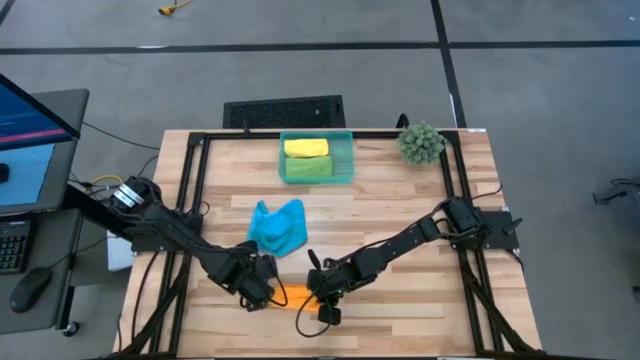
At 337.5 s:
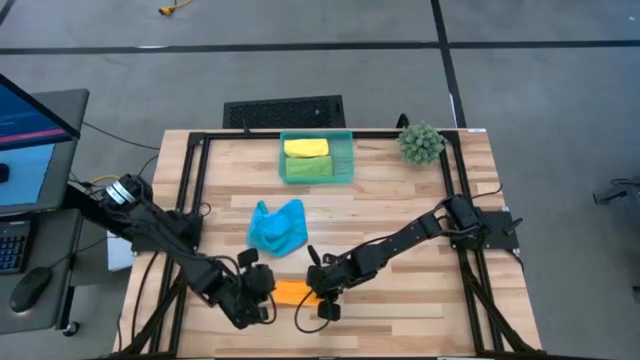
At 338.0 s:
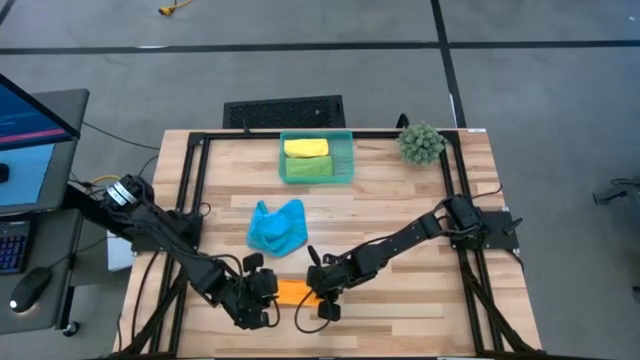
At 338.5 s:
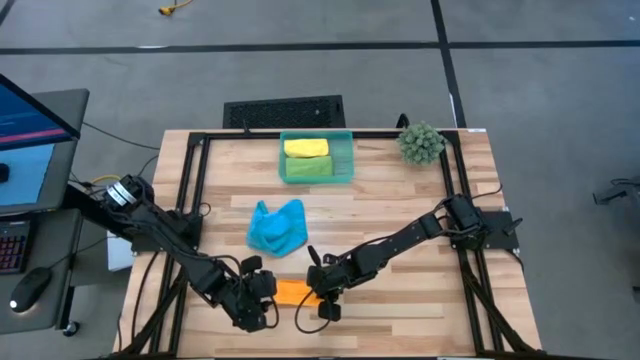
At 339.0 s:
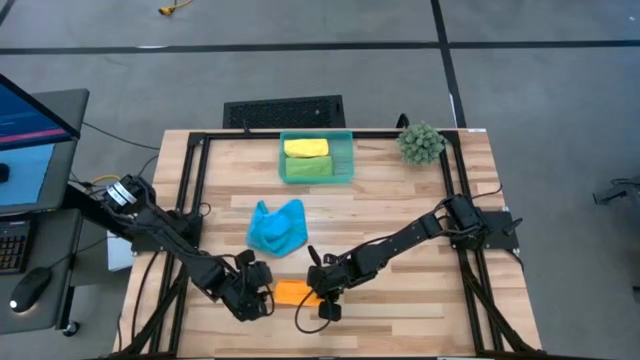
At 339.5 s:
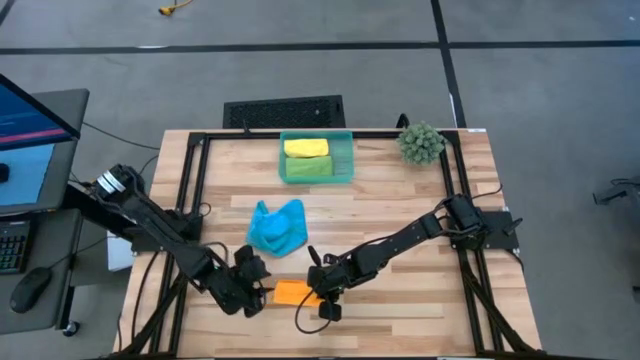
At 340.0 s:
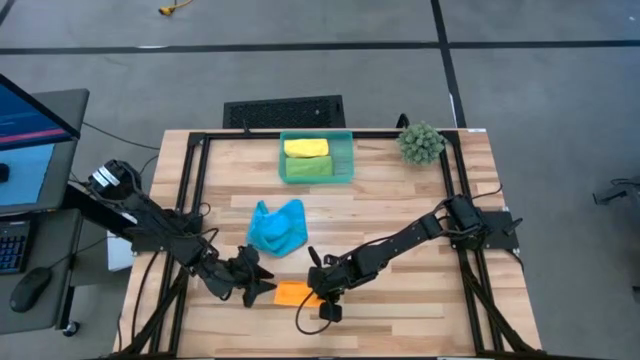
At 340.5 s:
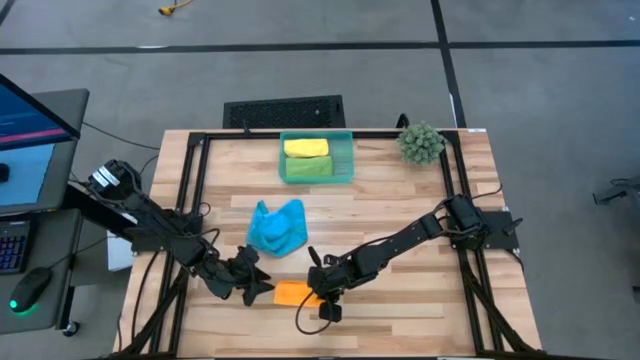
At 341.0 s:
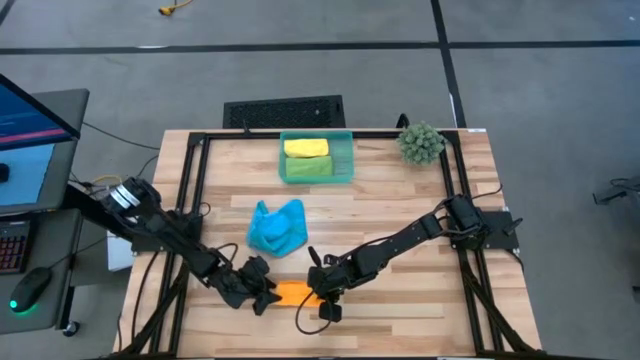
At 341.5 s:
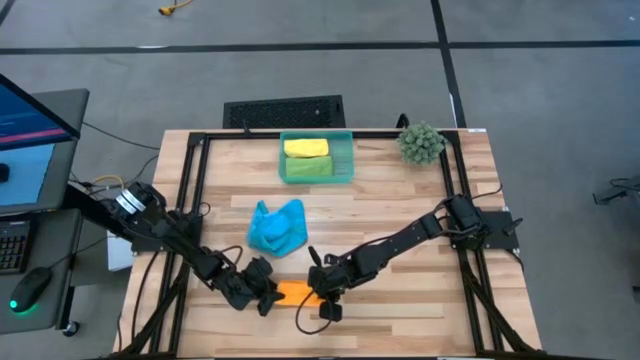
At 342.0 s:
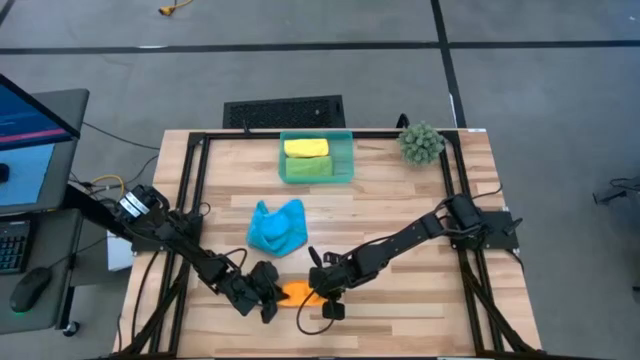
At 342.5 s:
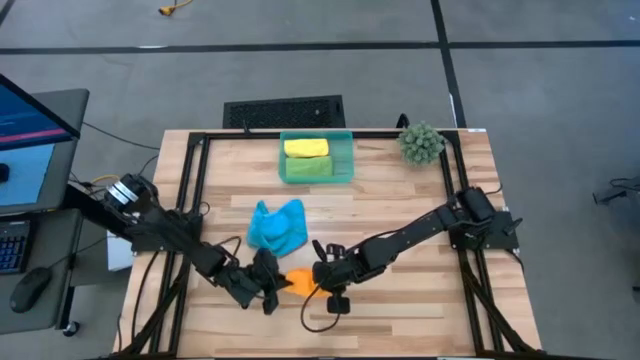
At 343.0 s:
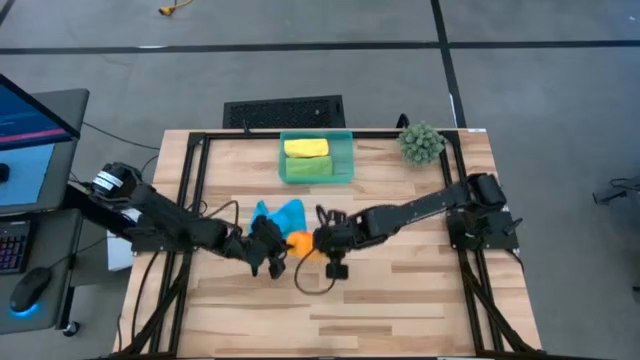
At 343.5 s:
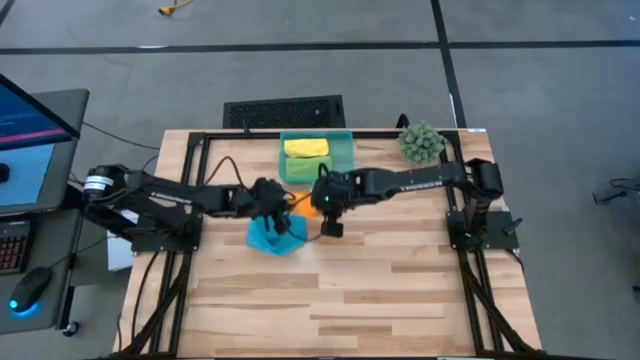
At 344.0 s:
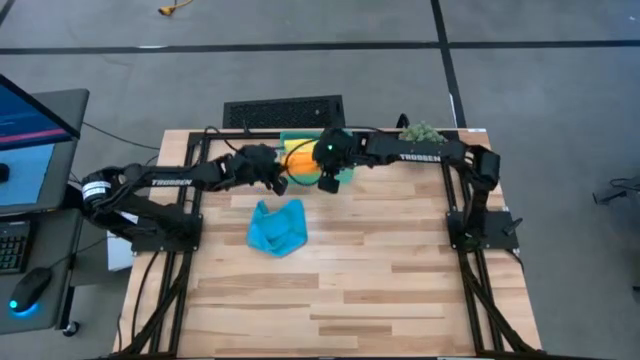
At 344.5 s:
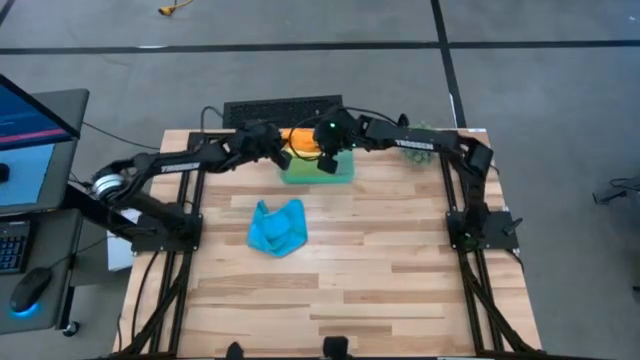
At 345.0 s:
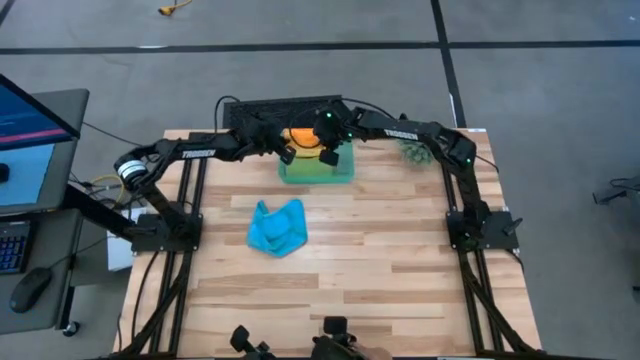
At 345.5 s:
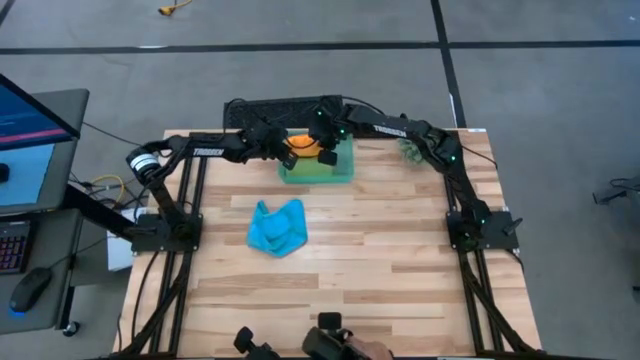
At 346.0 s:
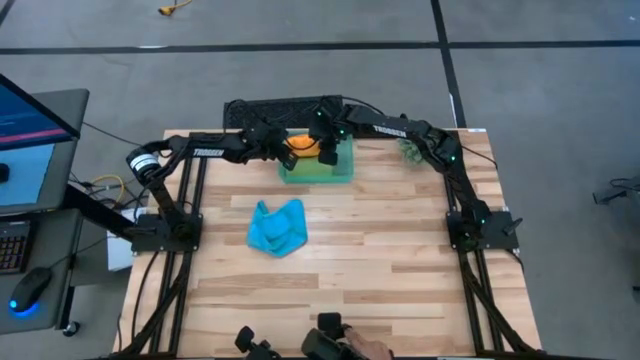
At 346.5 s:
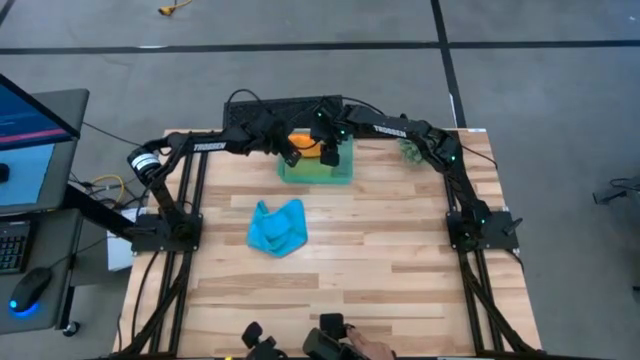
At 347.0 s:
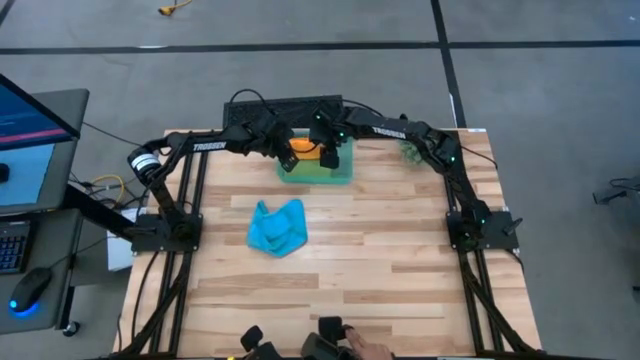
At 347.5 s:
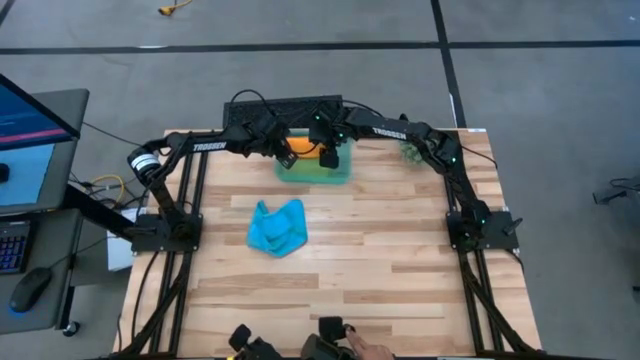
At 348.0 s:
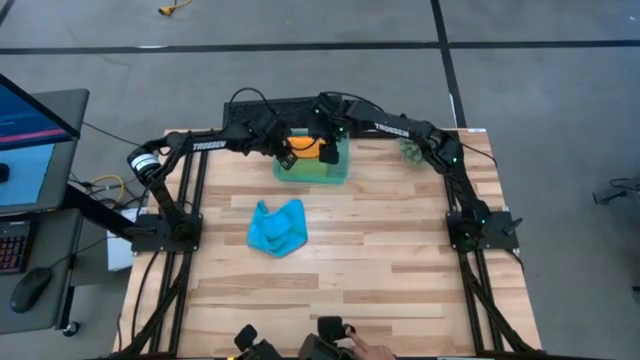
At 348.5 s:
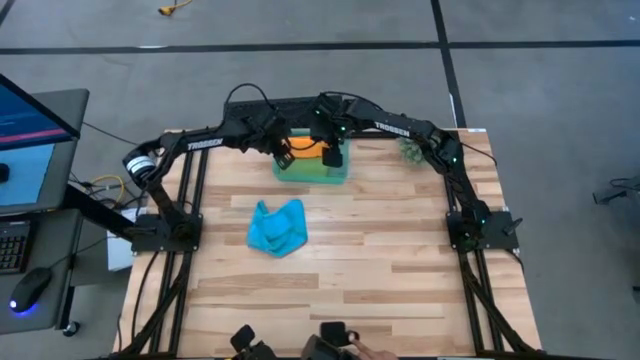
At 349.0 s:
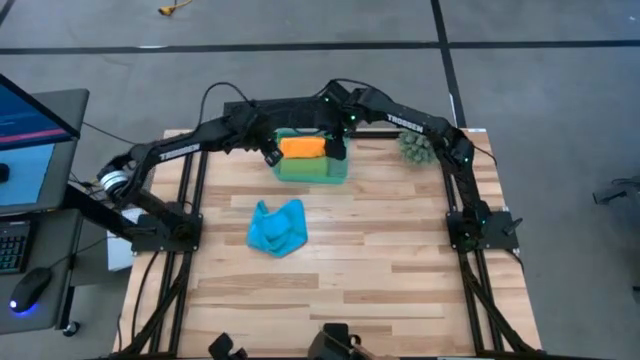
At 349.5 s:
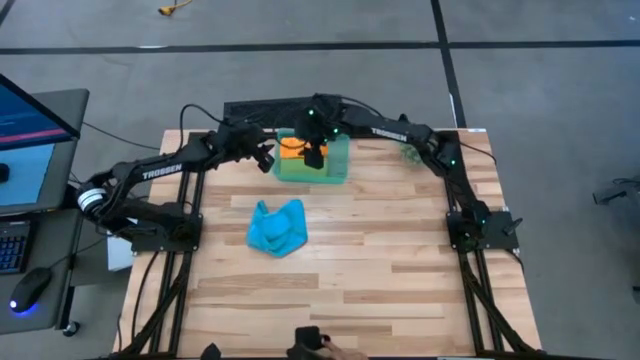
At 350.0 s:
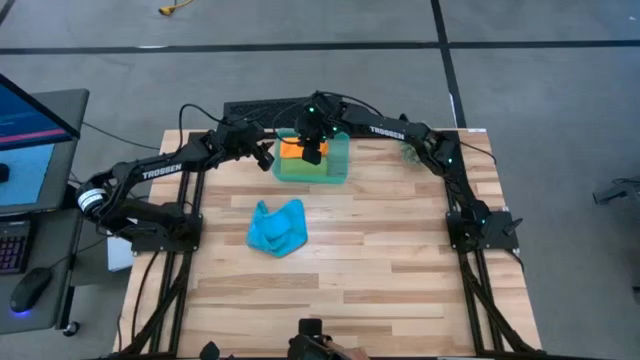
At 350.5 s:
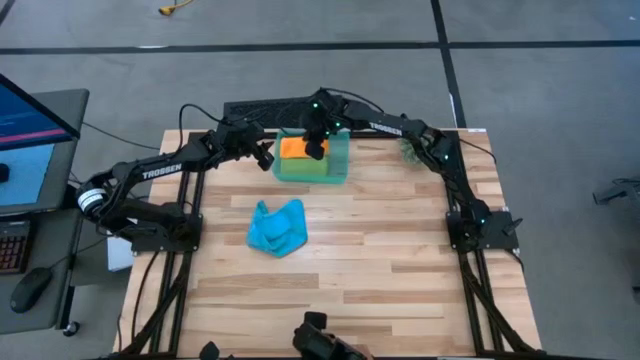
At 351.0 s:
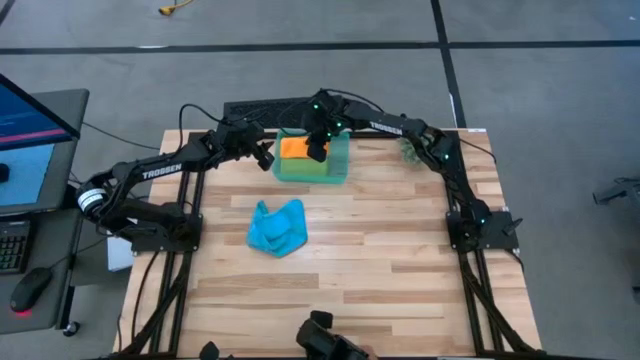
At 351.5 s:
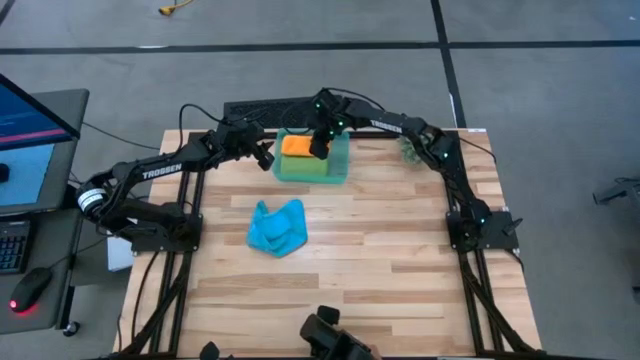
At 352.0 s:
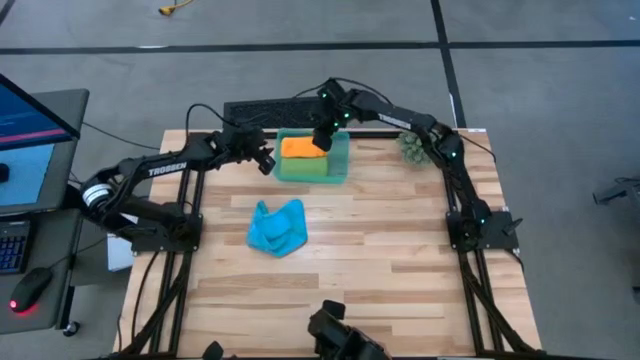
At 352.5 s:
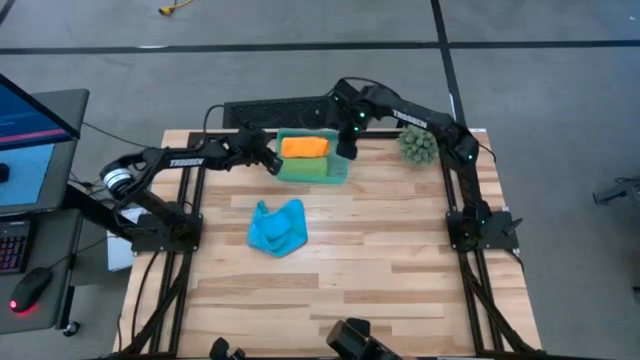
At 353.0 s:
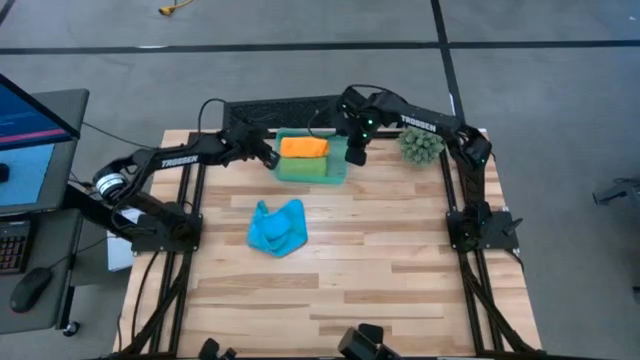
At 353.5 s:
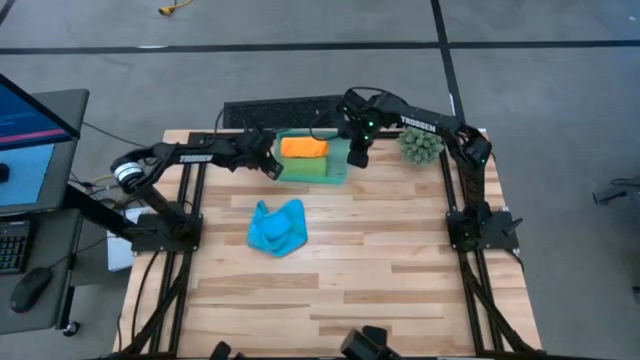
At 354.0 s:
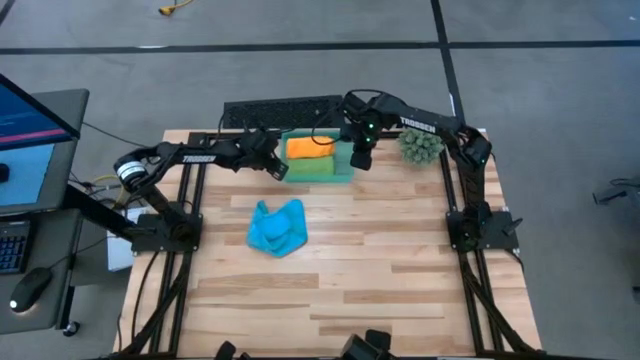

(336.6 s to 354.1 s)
Task: Roll microfiber towels into tight, uniform cylinder then place into a basket
Put the rolled orange microfiber cloth into the blue bin

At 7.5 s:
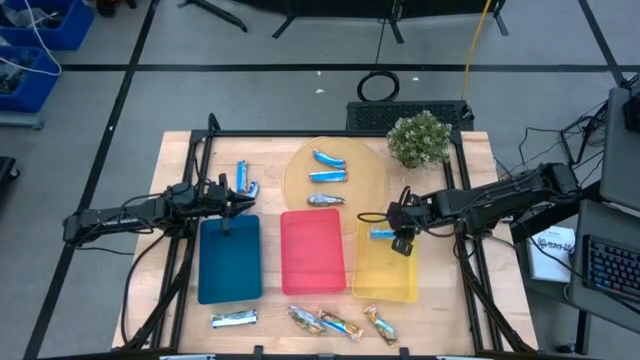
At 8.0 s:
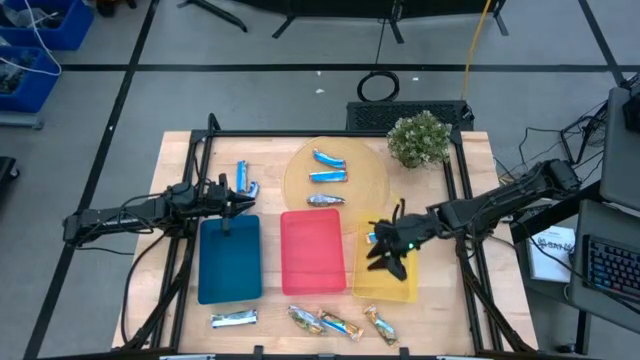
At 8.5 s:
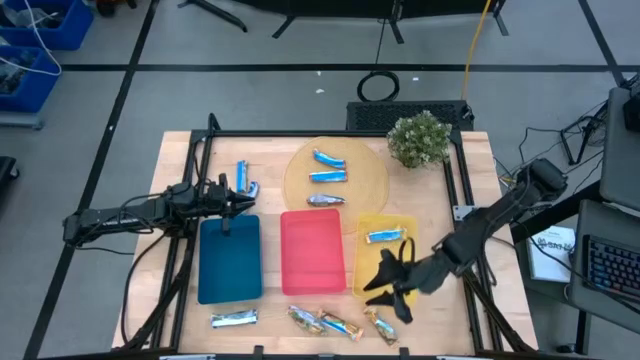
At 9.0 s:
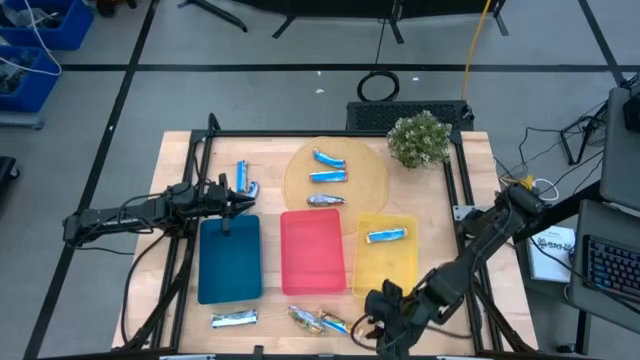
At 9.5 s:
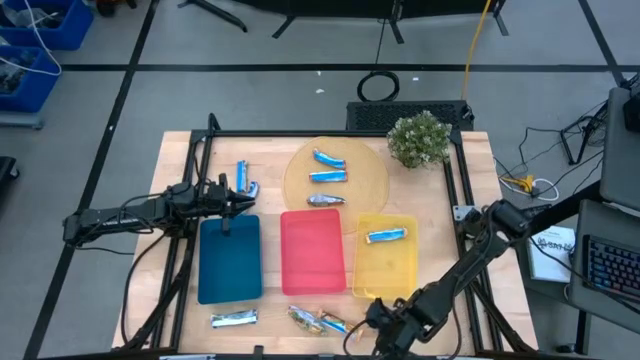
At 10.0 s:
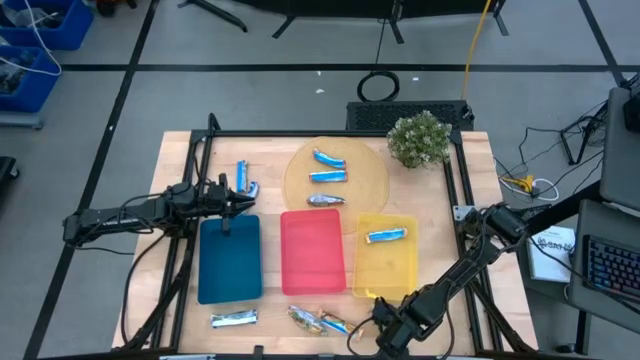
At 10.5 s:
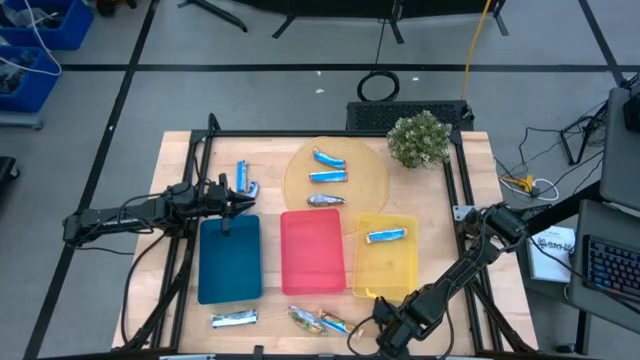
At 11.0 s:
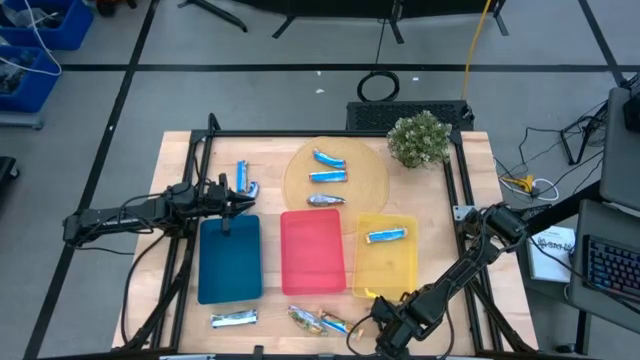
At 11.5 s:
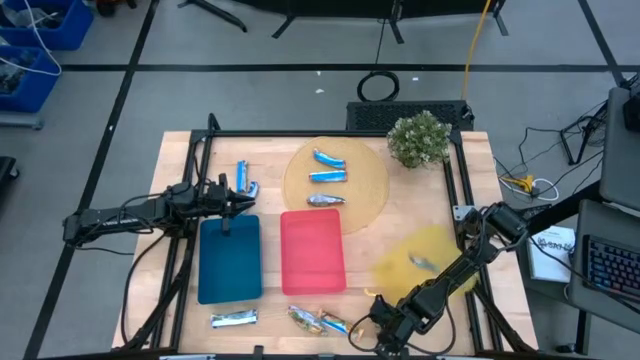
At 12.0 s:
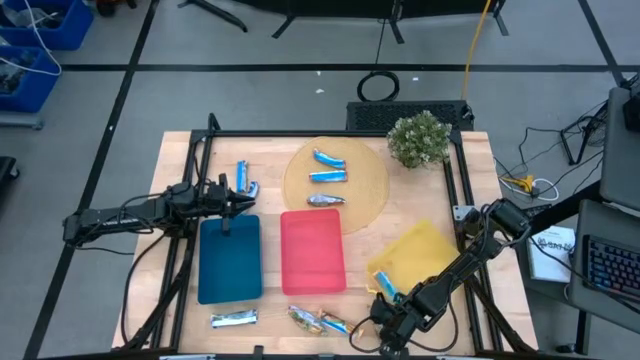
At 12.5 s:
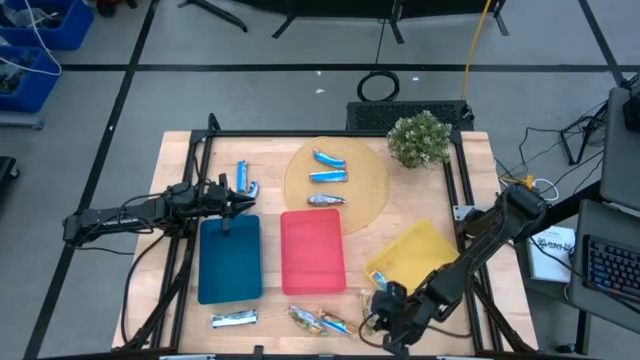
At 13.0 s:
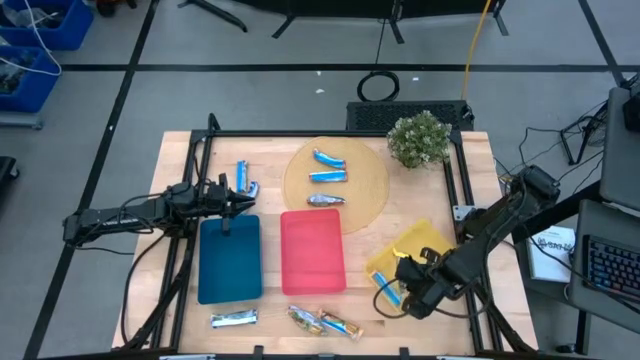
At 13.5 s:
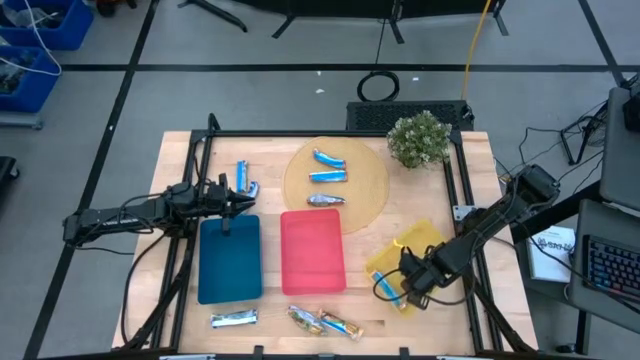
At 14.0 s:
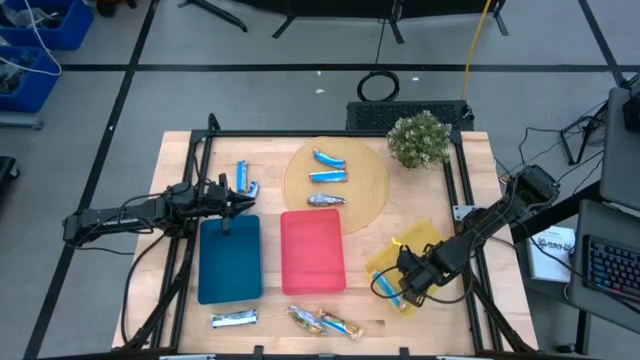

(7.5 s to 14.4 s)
Task: Pick and place Granola Bars by type
Put the right yellow granola bar into the yellow bin
